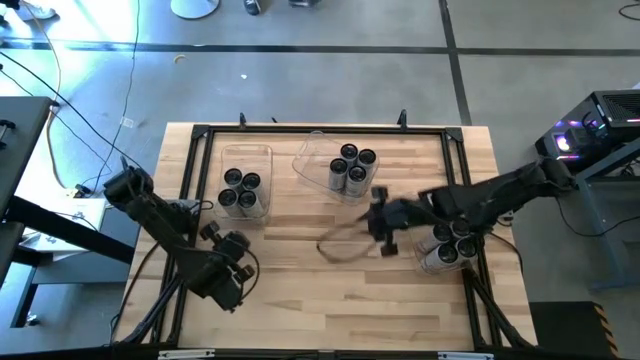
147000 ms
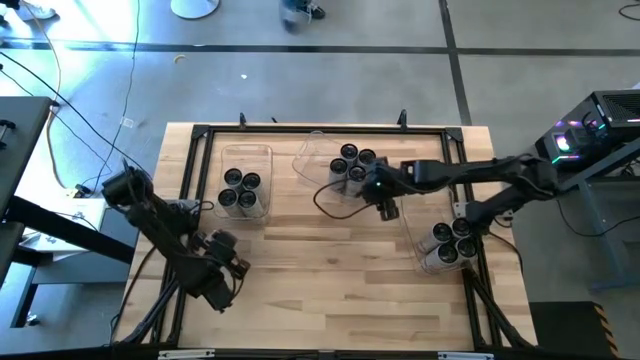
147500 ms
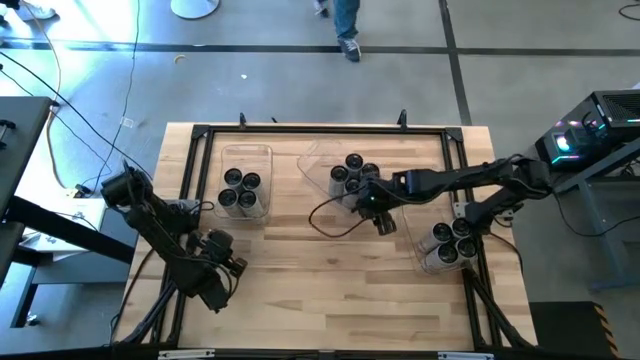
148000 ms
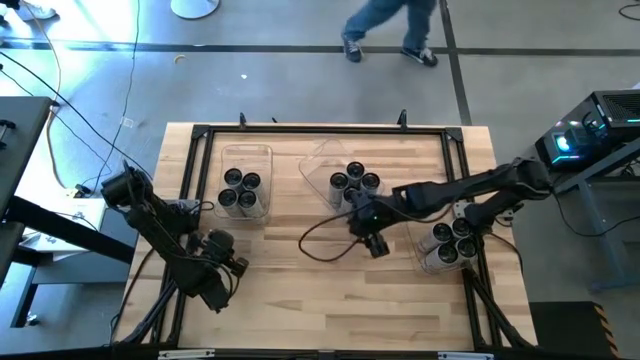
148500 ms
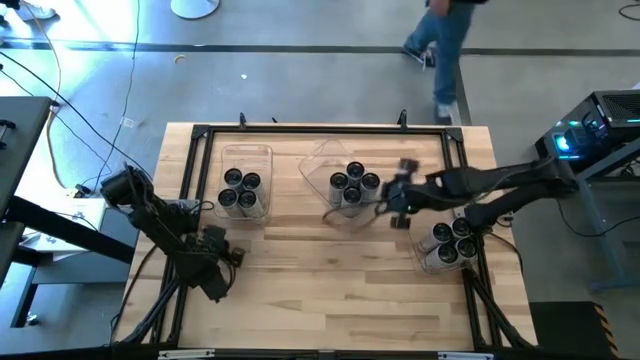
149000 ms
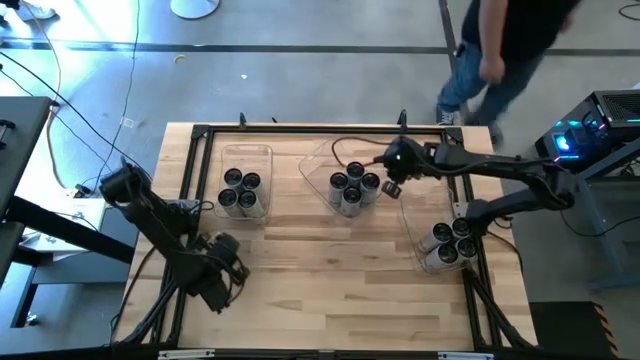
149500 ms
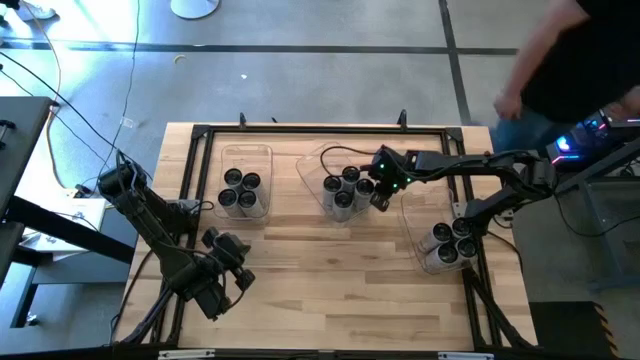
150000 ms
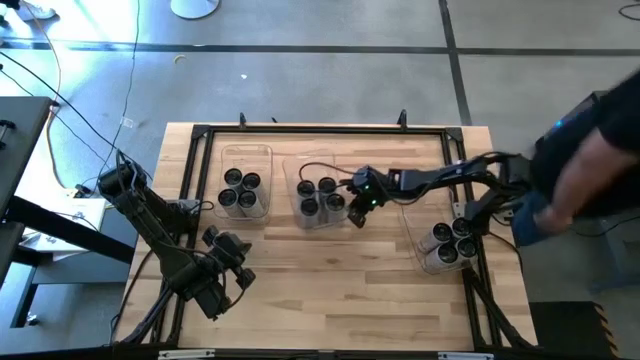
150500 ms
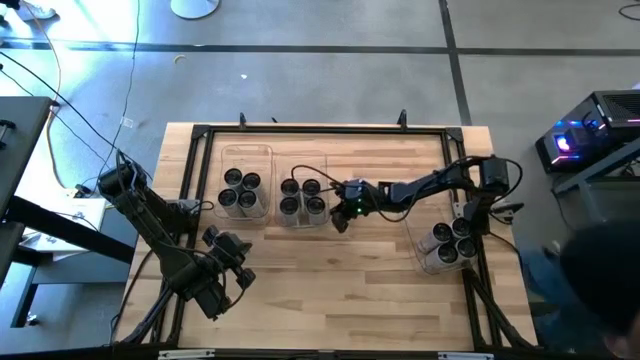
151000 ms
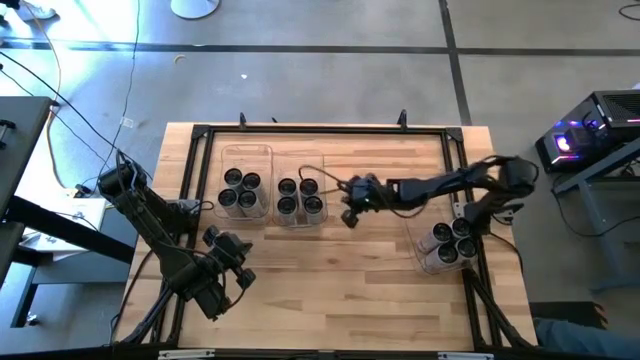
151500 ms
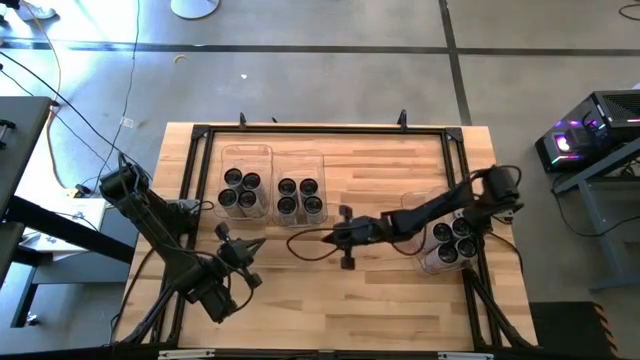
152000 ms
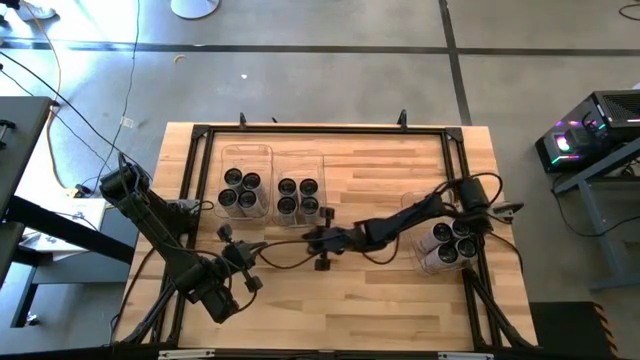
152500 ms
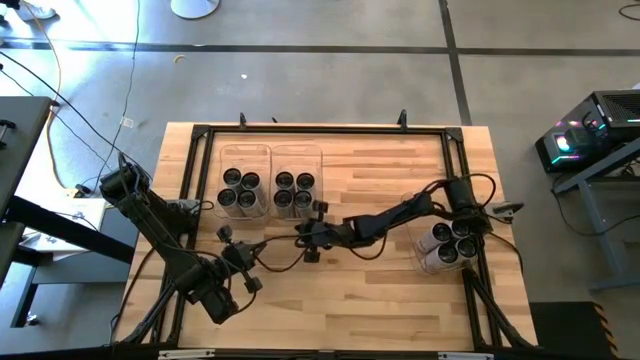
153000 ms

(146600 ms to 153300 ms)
Task: Sort soda cans
Adjust the middle transparent bin

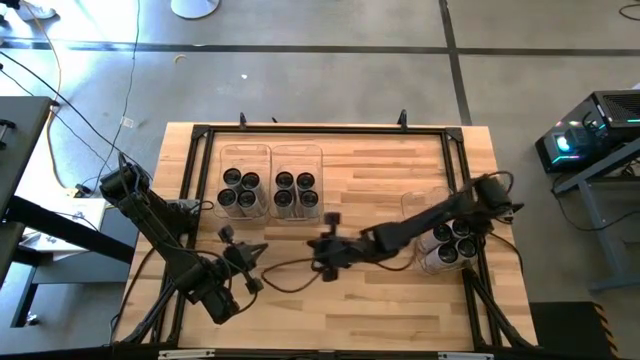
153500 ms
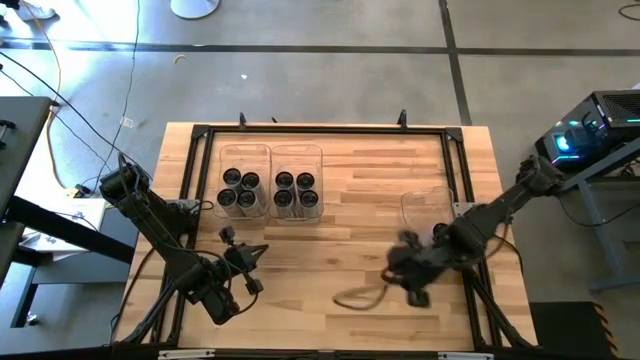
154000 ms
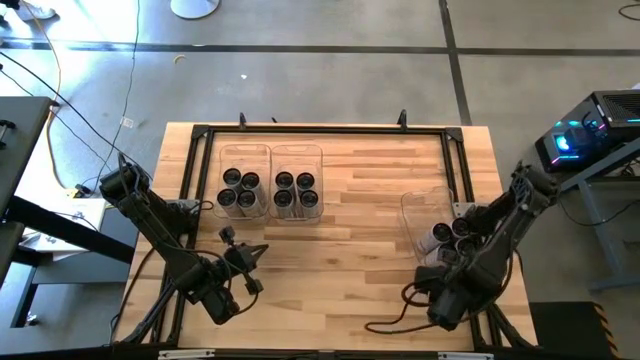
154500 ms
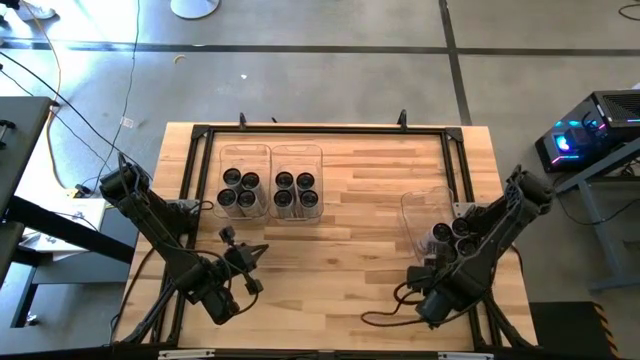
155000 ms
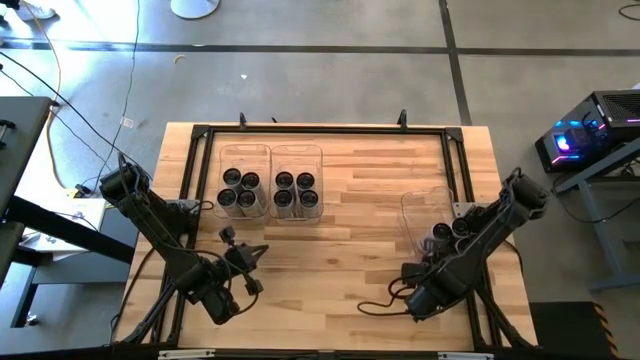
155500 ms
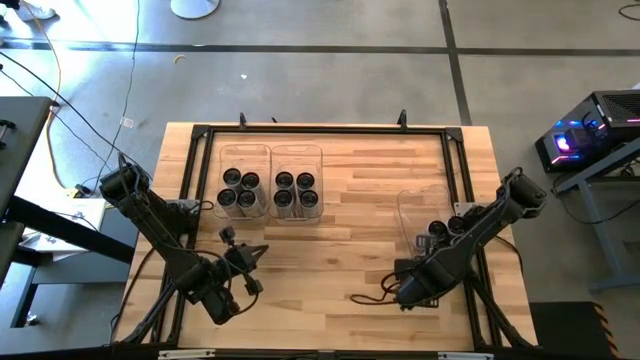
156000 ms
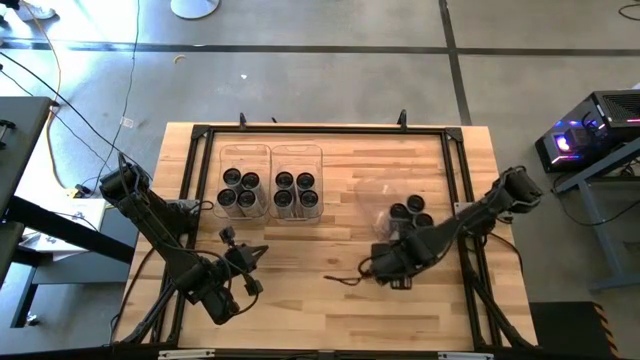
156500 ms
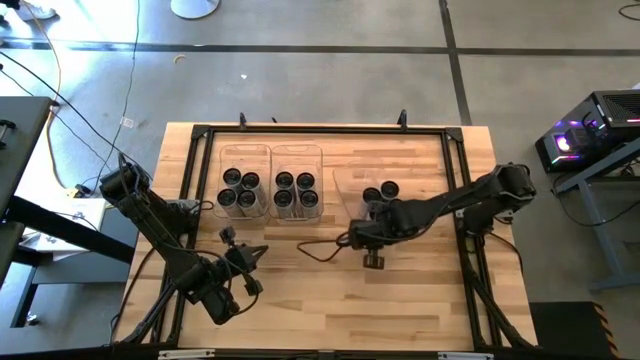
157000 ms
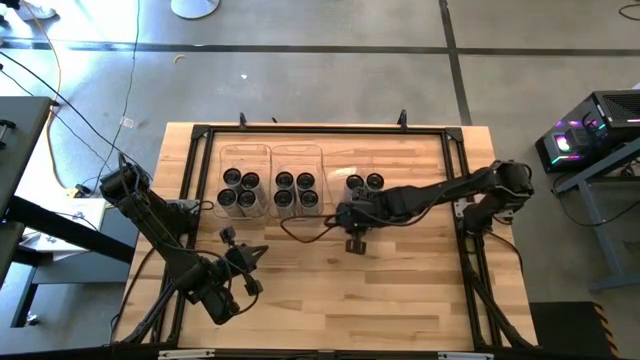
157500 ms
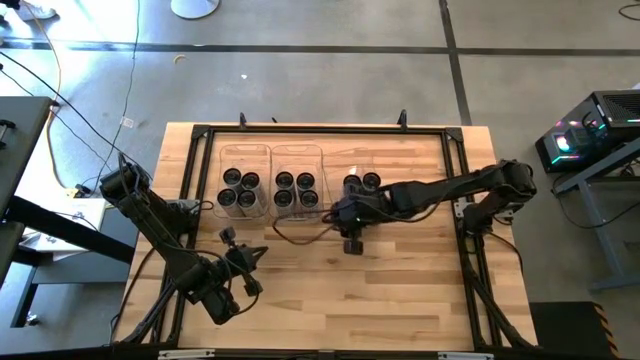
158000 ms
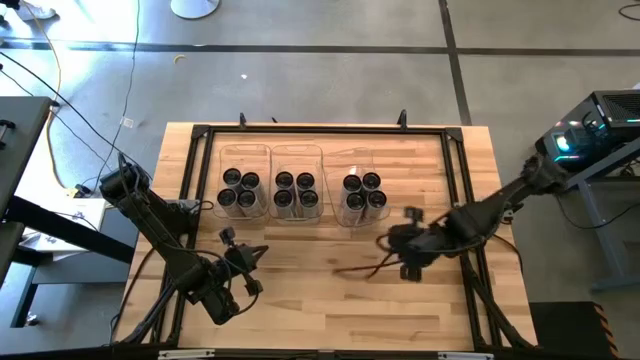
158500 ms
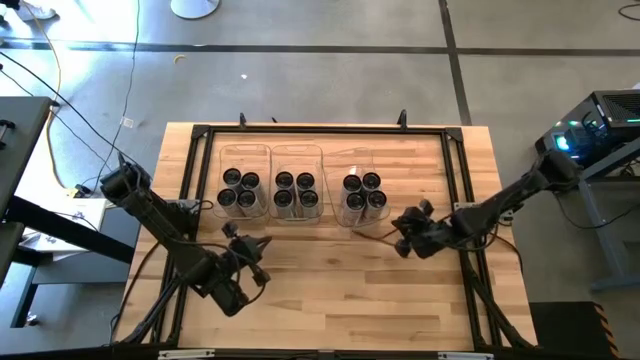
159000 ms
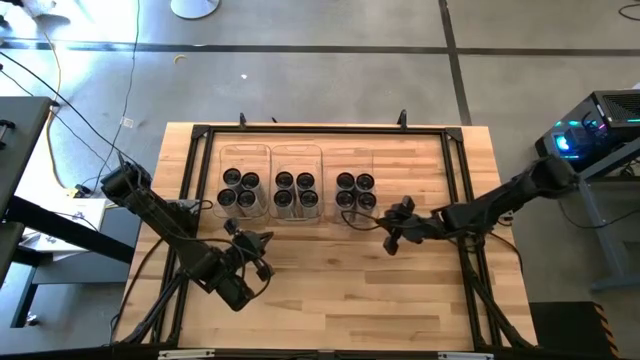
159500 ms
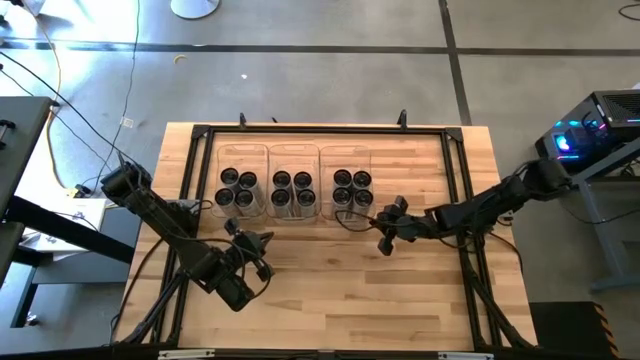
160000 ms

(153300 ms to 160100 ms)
Move the right transparent bin to the left side of the middle transparent bin

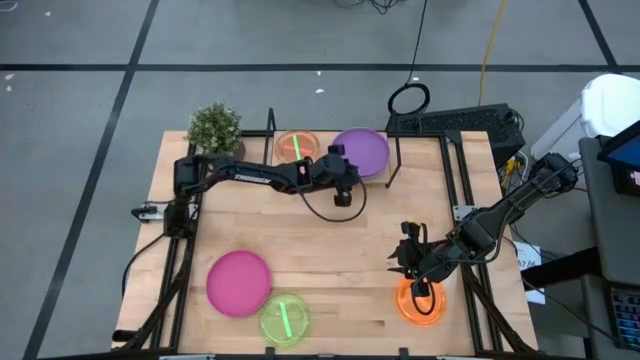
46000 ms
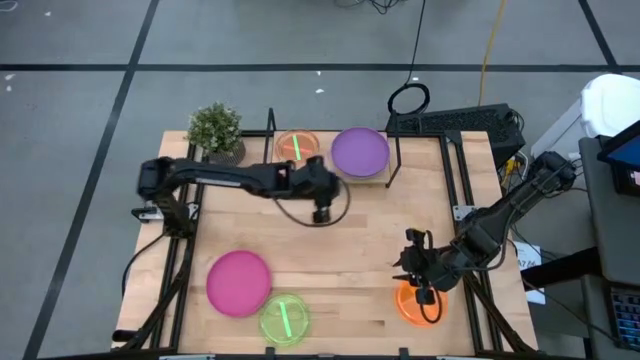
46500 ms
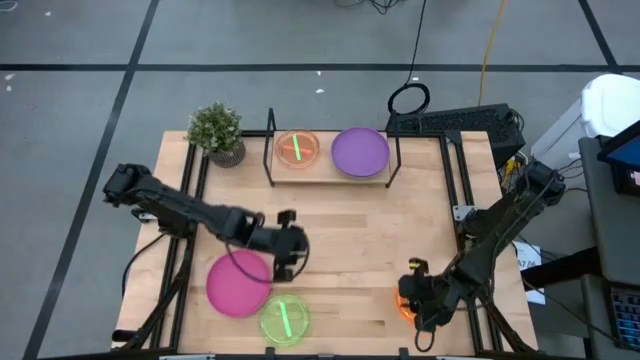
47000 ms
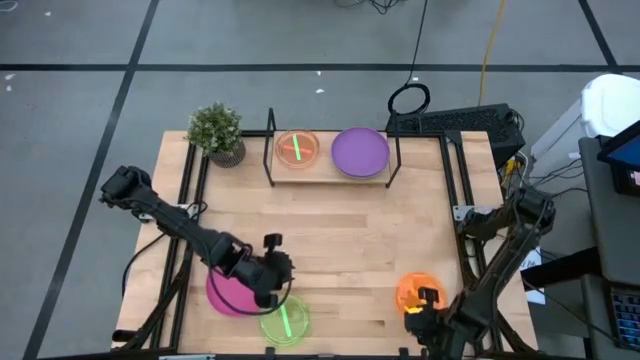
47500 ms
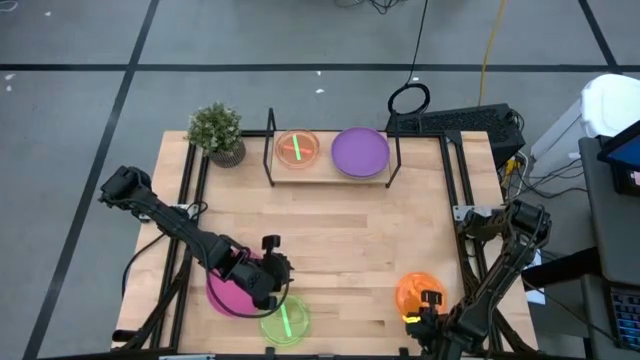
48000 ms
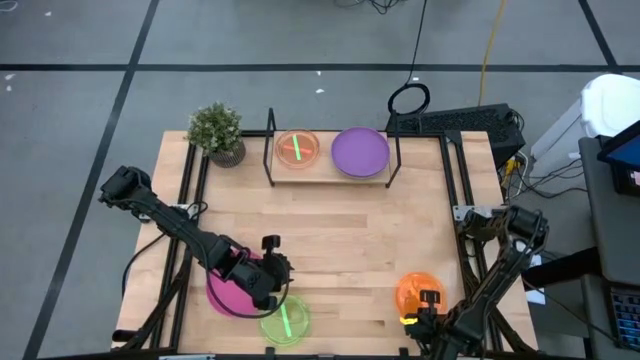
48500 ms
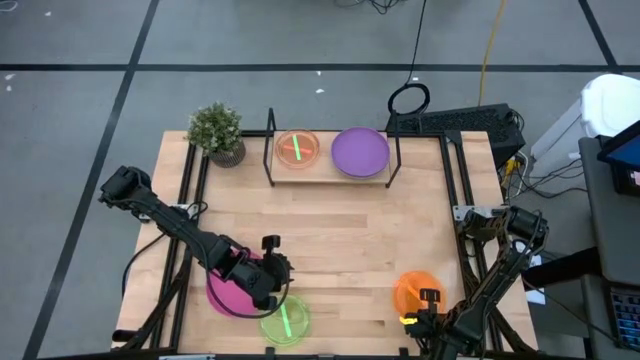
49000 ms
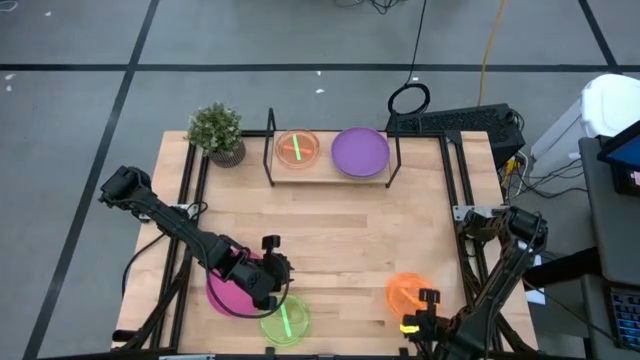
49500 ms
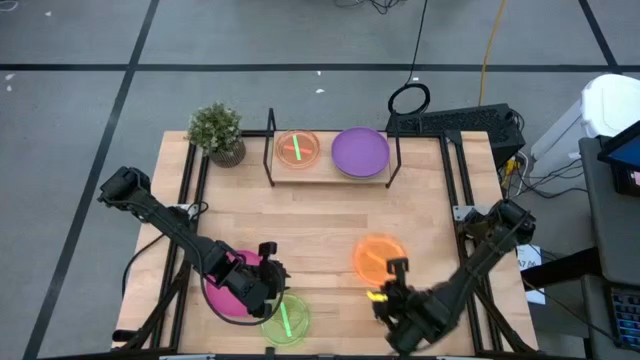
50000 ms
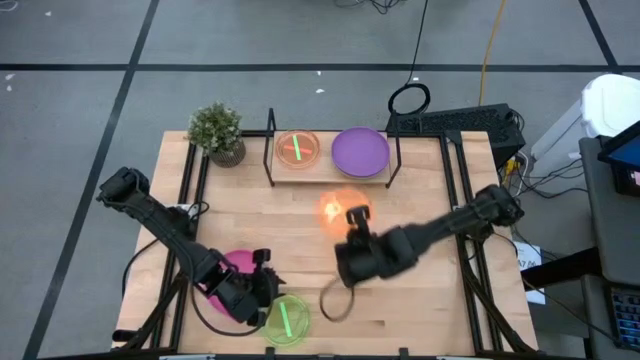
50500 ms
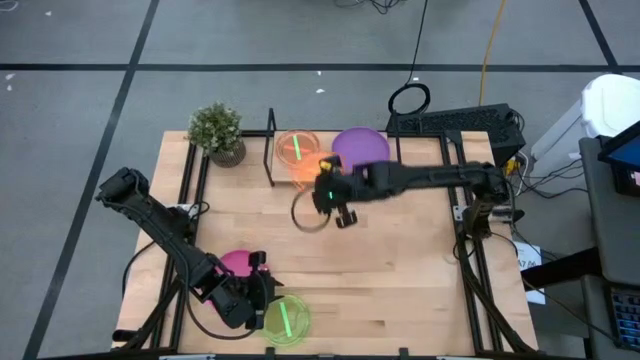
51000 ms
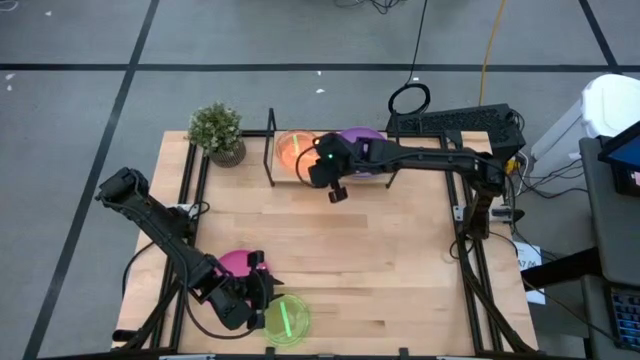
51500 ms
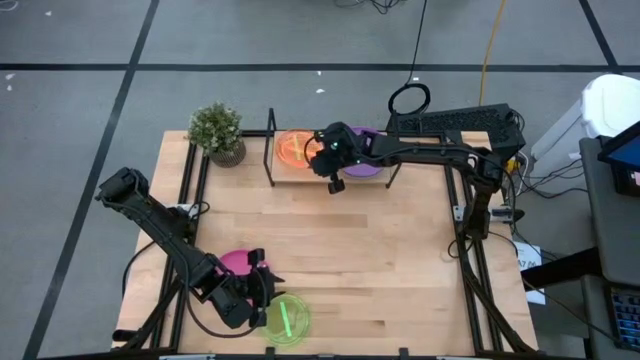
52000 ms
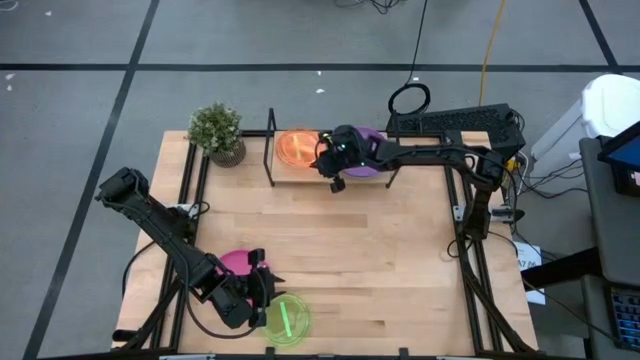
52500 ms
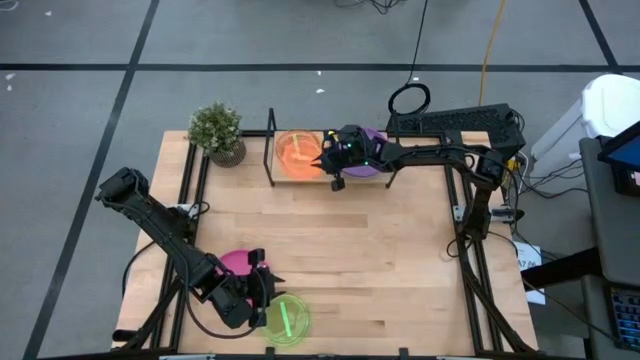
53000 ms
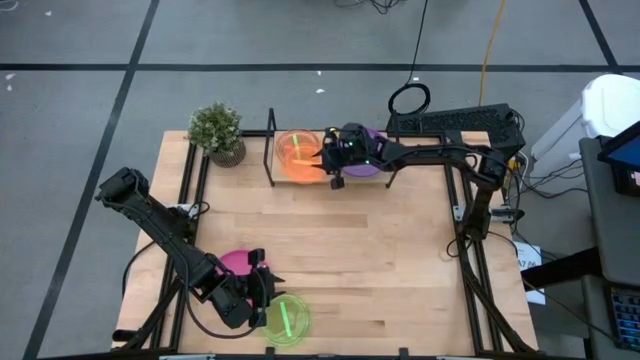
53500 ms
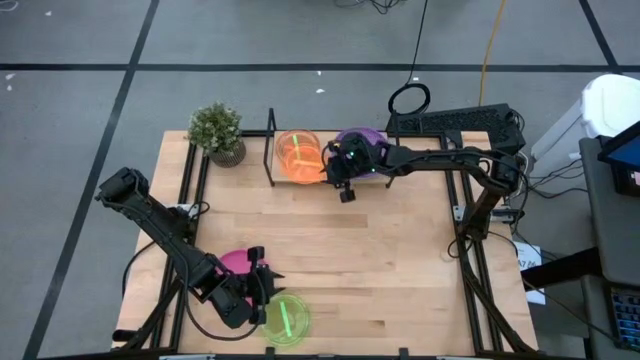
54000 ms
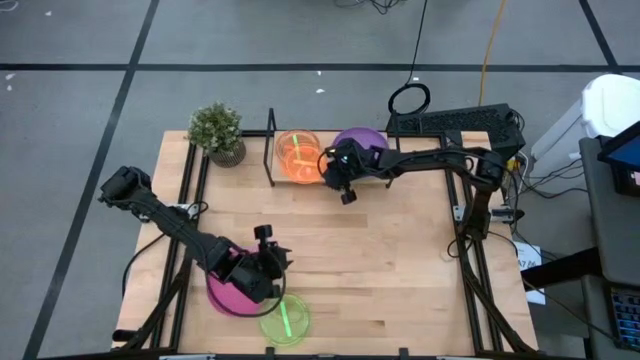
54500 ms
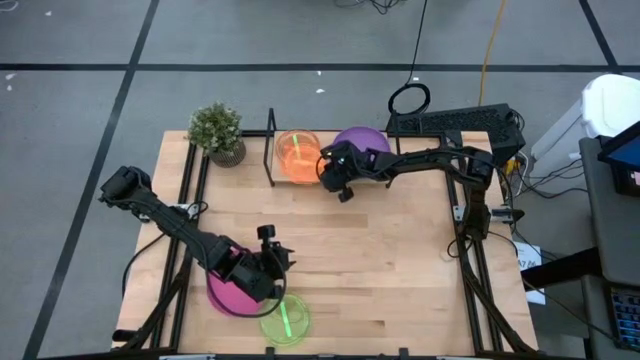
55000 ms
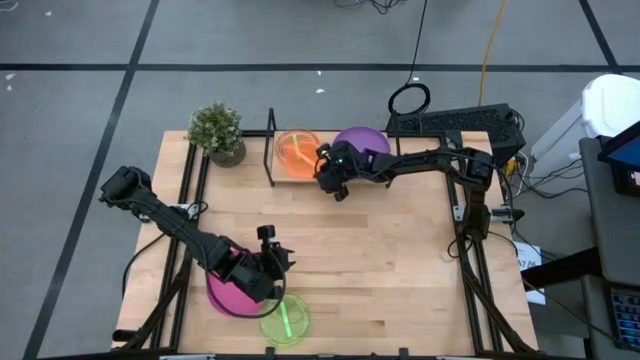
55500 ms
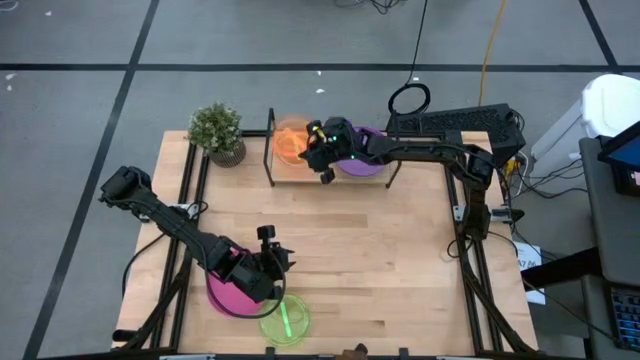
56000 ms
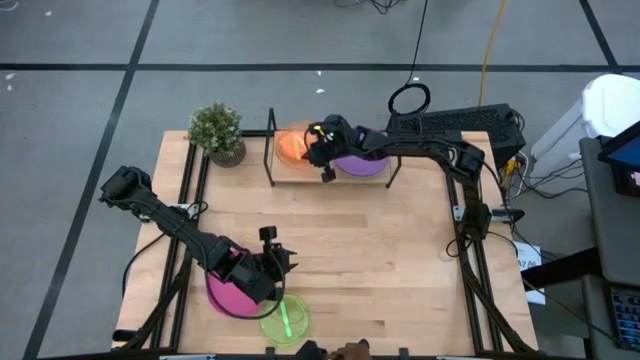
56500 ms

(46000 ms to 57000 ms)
Task: Place and stack plates onto a shelf
Stack the transparent orange plate on top of the transparent green plate on the shelf
